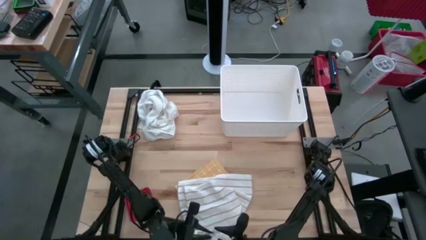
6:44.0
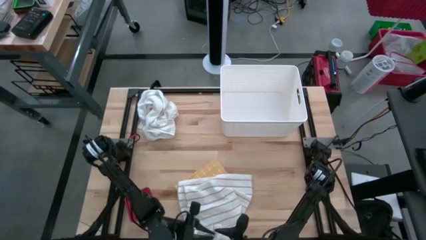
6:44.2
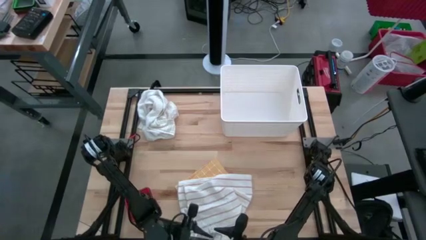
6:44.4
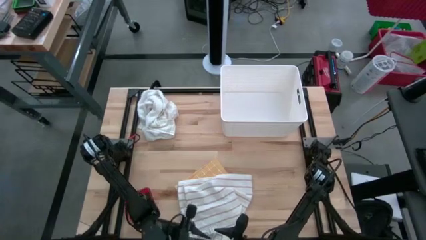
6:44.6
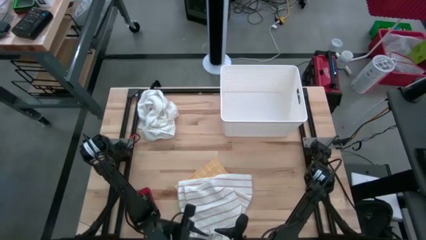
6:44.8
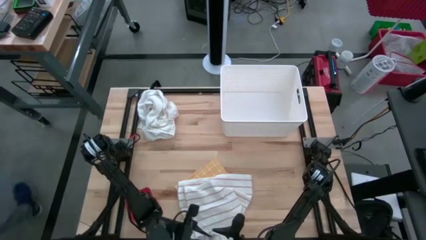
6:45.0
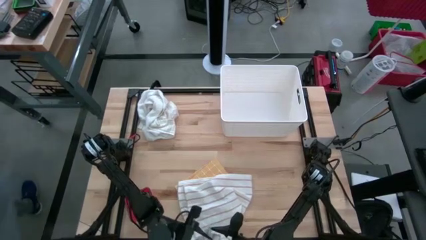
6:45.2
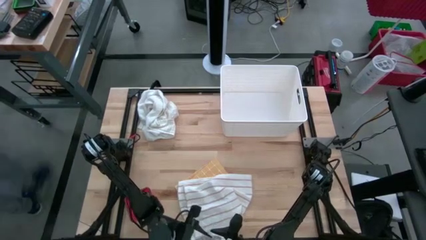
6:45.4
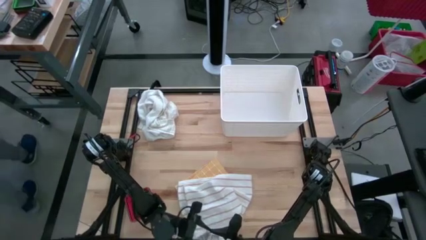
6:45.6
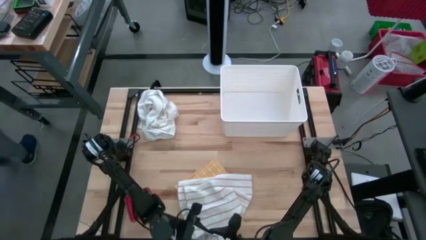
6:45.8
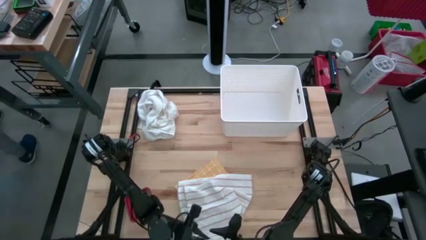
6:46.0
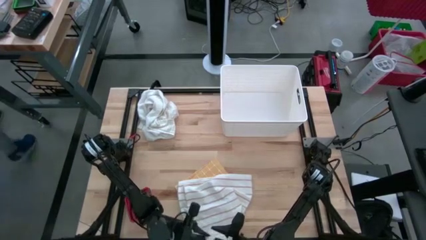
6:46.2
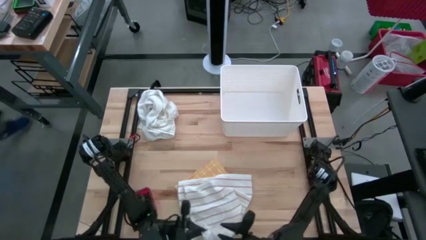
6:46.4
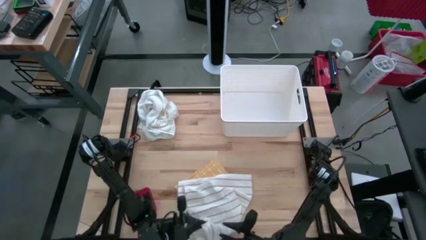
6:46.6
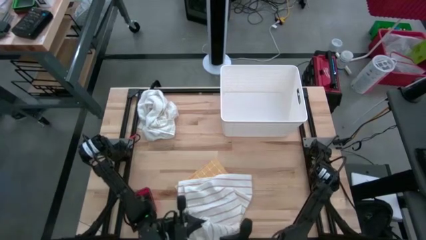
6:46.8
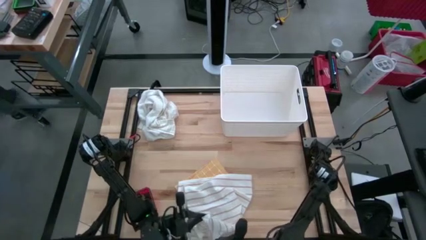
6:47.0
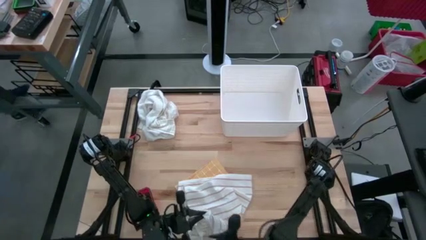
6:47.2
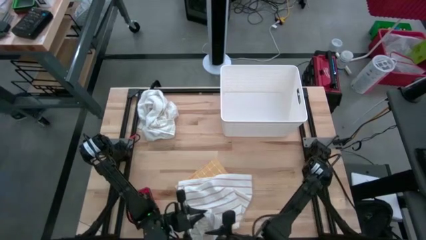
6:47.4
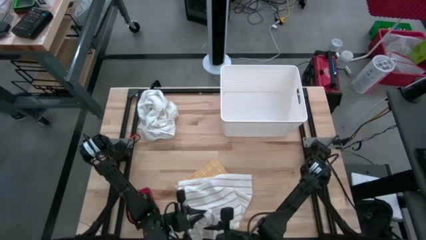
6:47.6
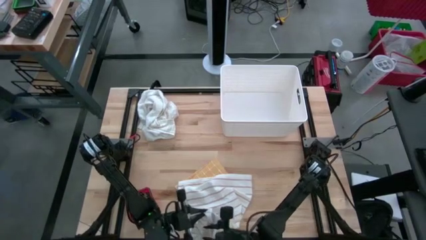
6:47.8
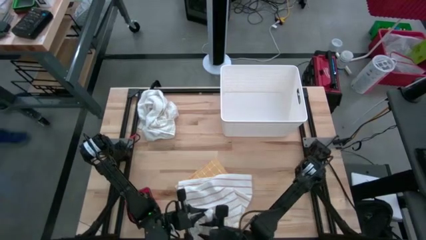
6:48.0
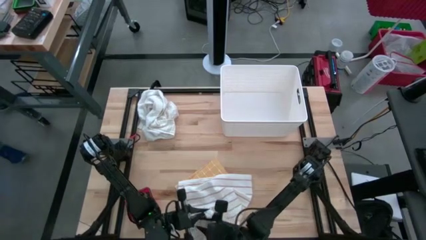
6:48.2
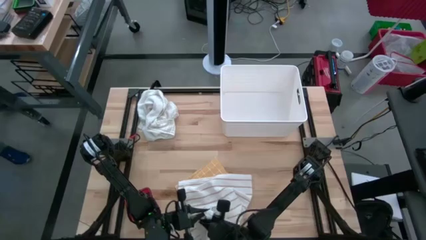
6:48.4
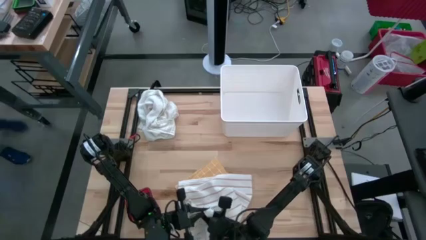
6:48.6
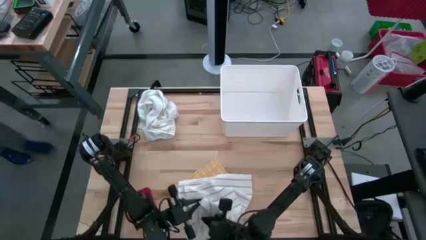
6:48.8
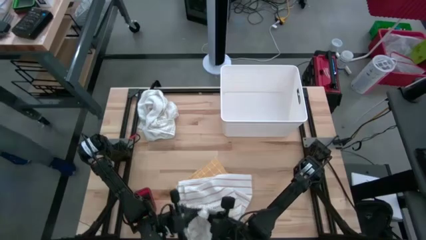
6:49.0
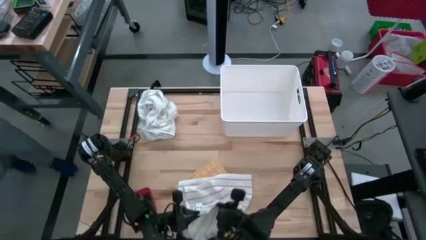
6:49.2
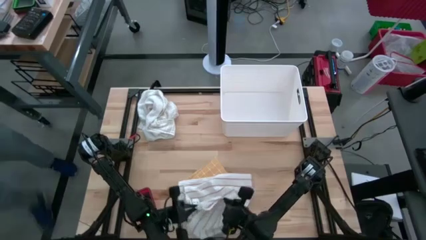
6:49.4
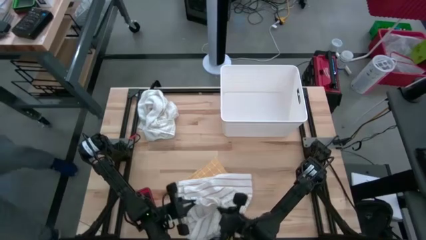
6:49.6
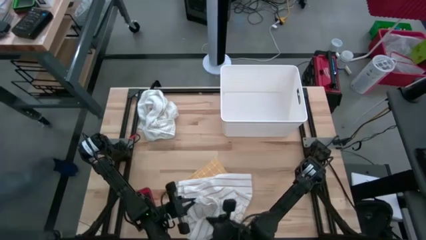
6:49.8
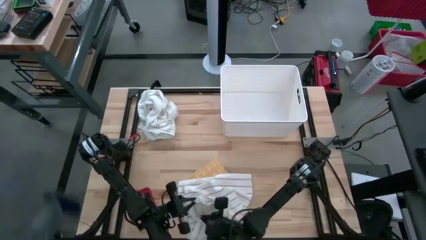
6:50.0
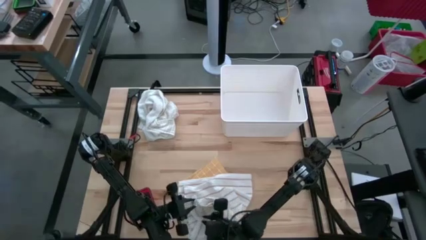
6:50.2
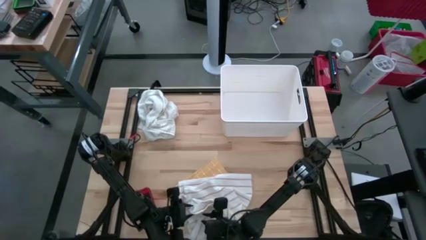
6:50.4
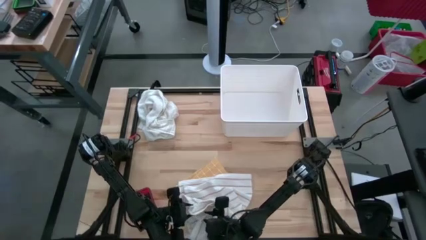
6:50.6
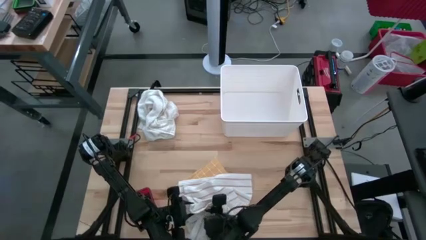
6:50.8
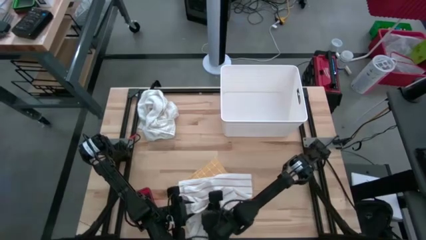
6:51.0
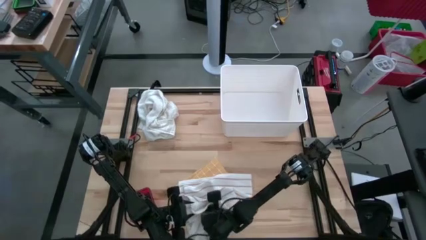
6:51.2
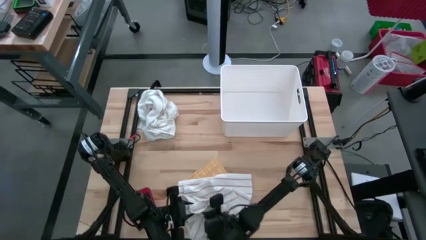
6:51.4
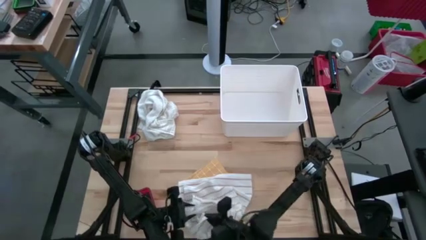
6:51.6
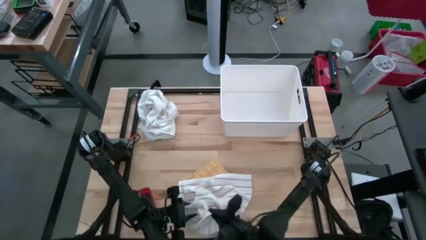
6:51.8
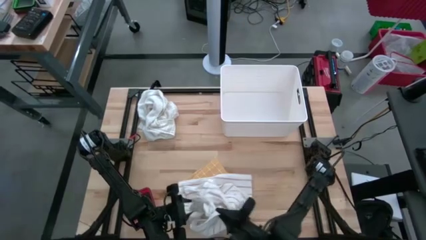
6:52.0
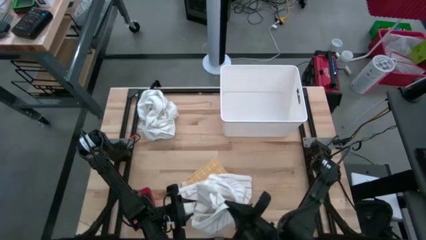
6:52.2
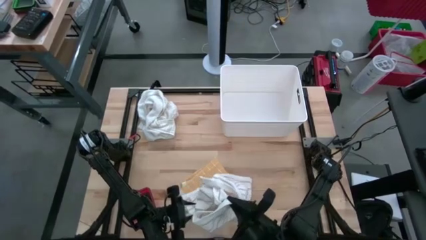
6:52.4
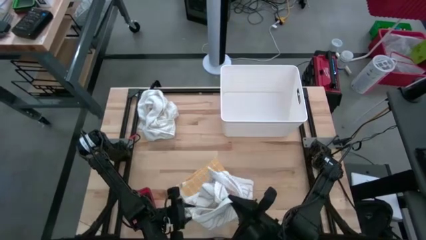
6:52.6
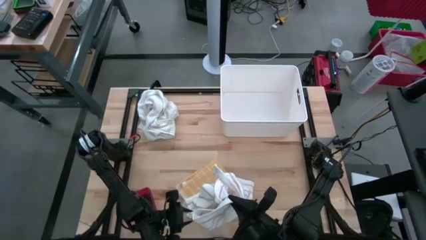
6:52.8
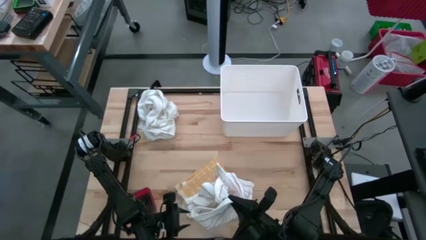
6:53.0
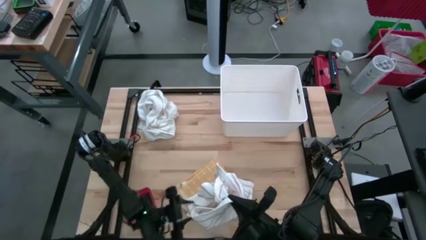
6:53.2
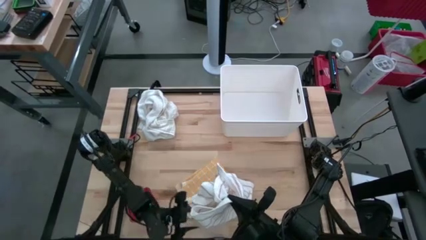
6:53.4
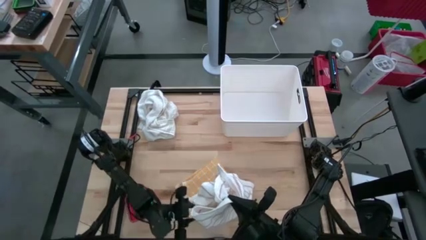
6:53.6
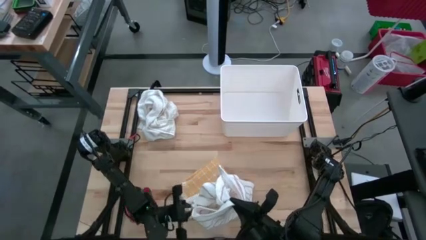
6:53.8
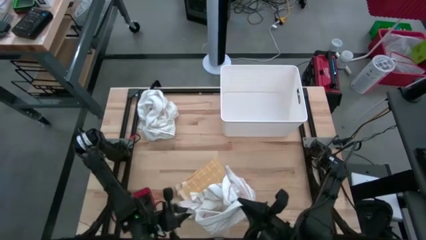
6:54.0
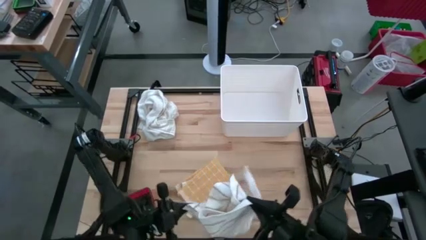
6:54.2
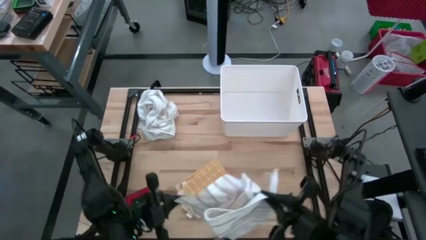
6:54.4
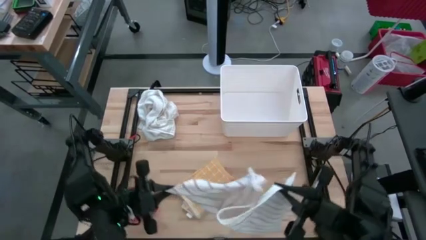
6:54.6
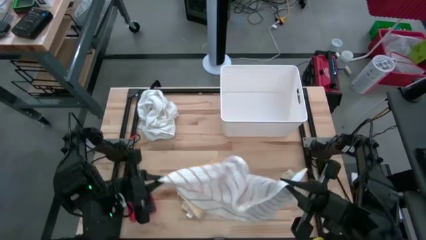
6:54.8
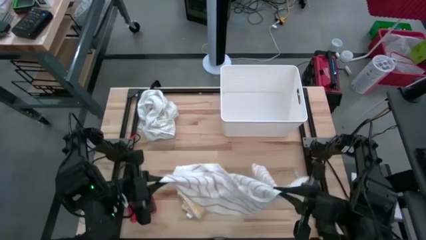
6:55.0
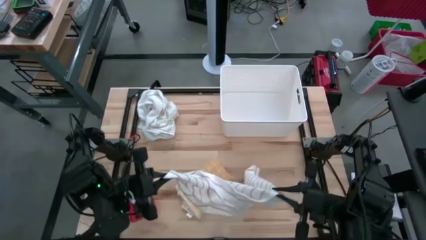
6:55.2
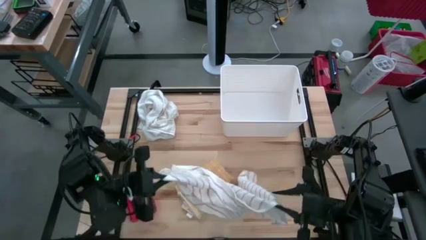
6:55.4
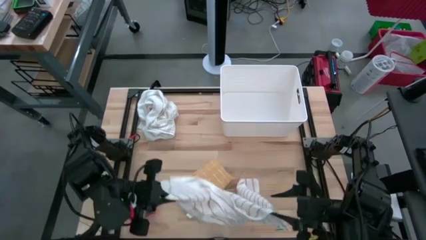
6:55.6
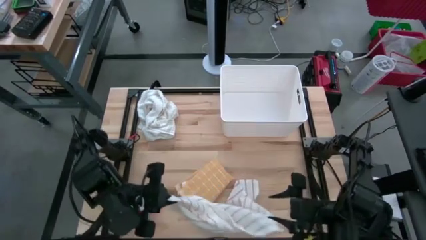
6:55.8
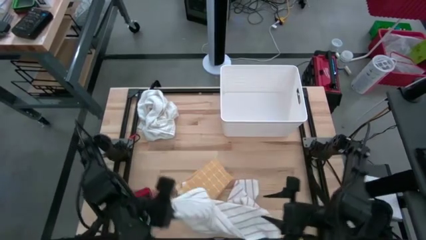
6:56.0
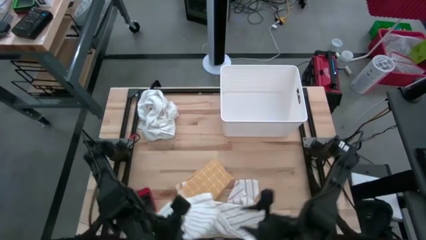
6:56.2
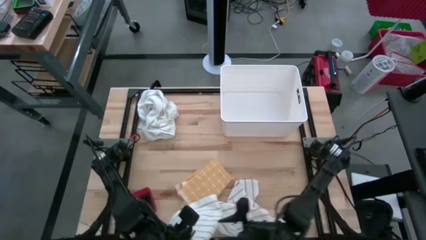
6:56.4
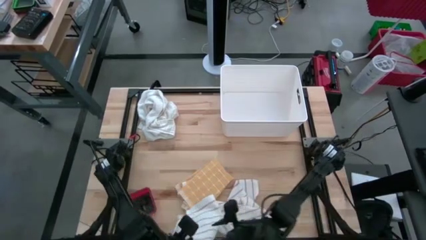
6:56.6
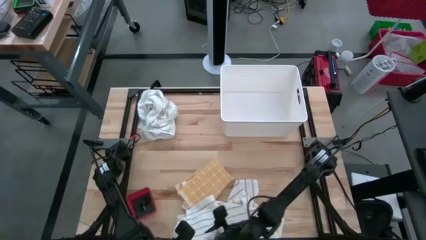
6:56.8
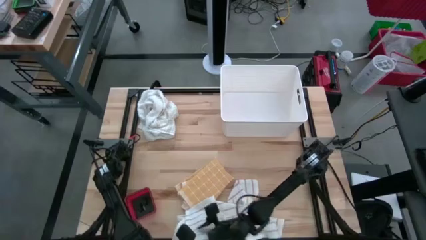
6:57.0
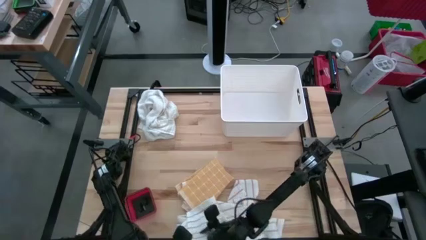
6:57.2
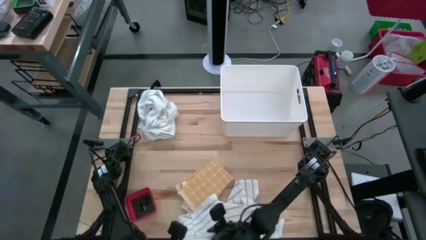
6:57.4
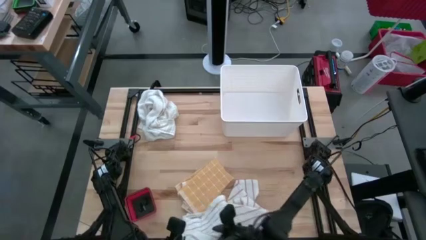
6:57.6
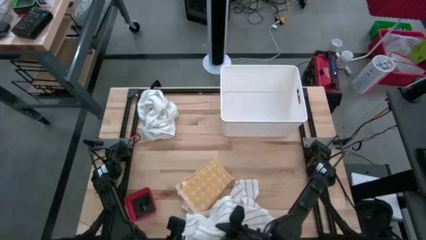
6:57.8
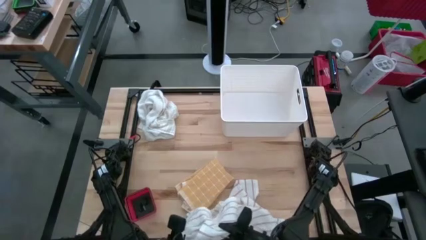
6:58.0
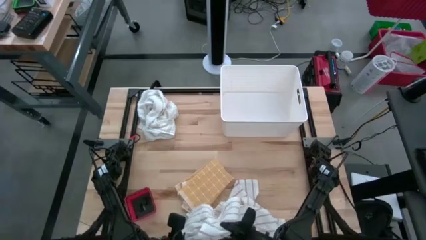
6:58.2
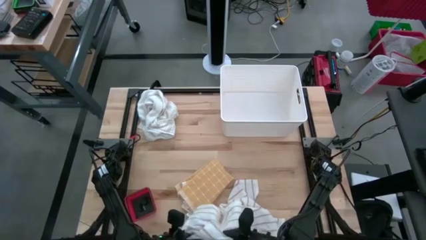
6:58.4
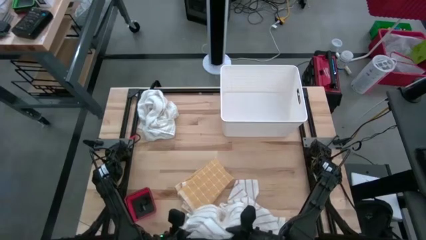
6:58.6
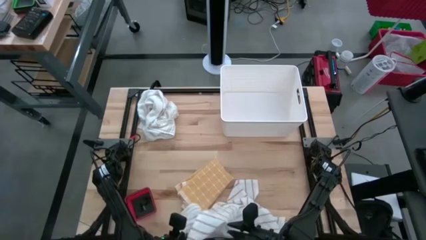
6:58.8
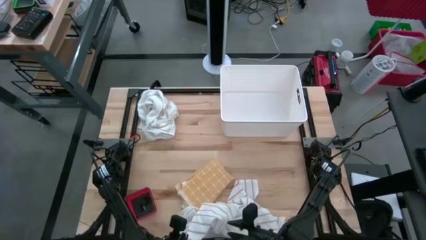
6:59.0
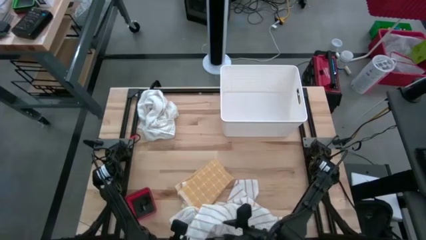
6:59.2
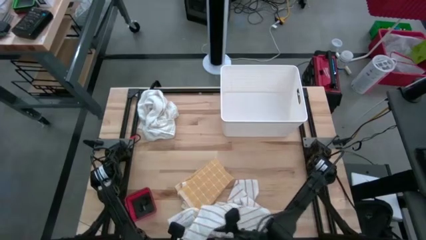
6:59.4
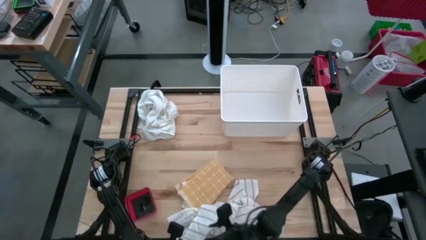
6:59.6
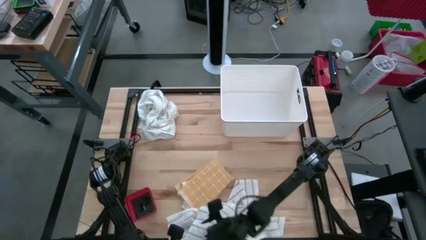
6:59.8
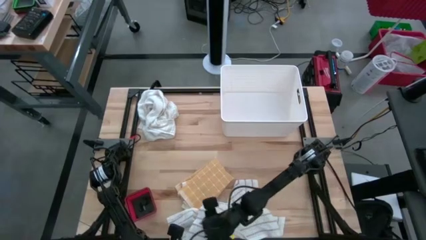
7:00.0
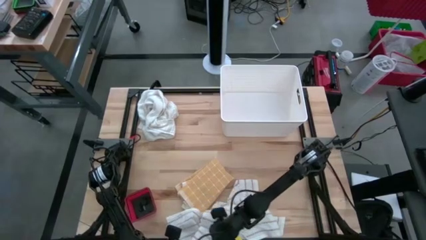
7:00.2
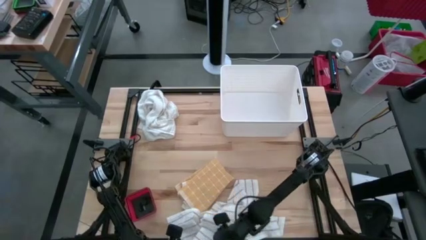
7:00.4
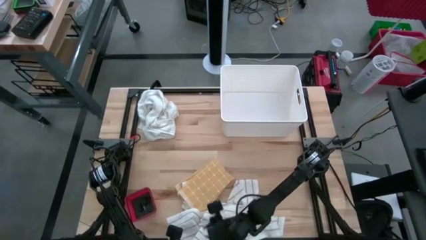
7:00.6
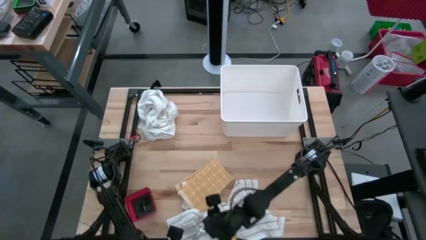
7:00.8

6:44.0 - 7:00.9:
Task: Fold towel
Fold the white kitchen towel
